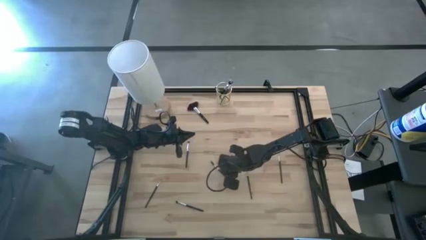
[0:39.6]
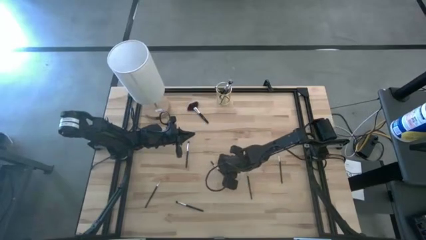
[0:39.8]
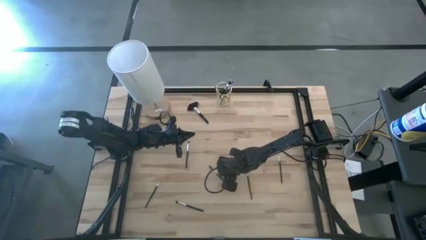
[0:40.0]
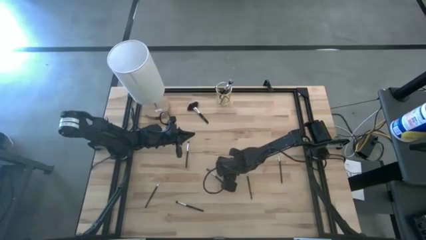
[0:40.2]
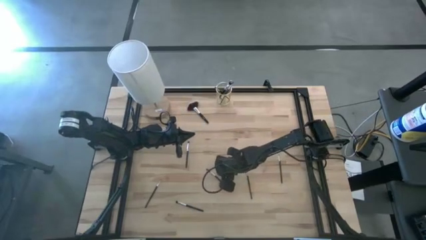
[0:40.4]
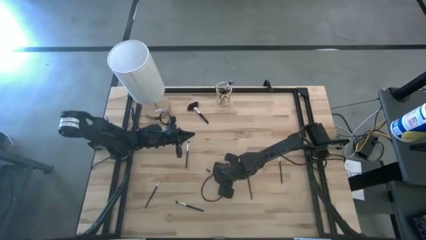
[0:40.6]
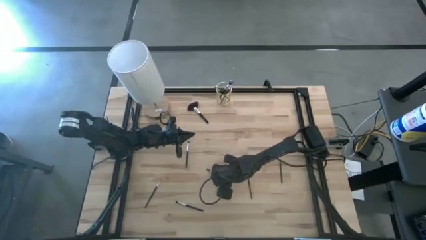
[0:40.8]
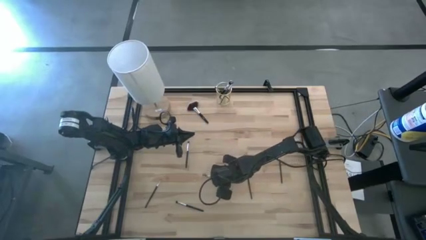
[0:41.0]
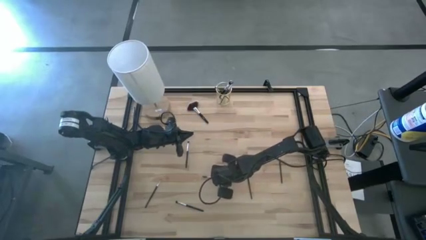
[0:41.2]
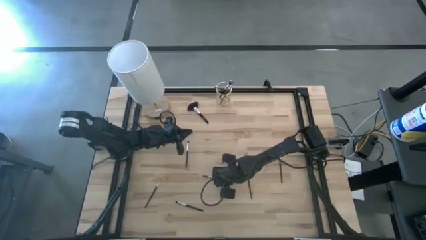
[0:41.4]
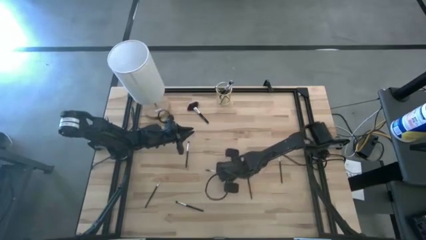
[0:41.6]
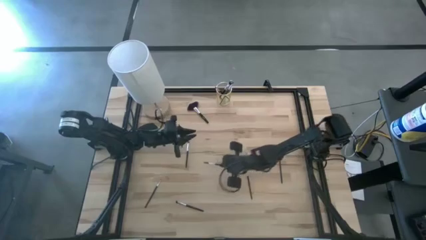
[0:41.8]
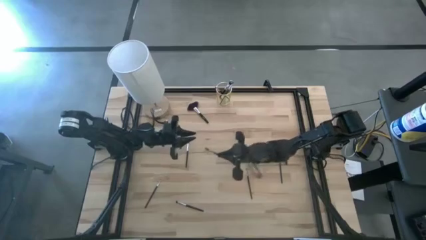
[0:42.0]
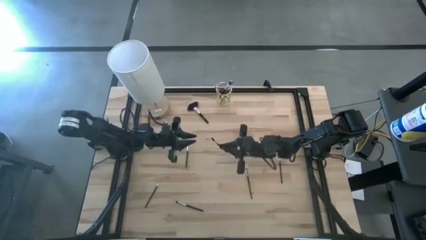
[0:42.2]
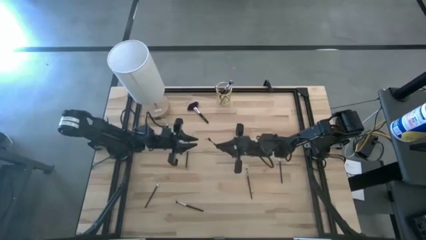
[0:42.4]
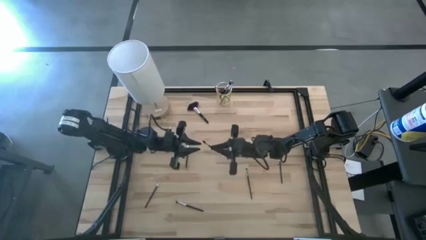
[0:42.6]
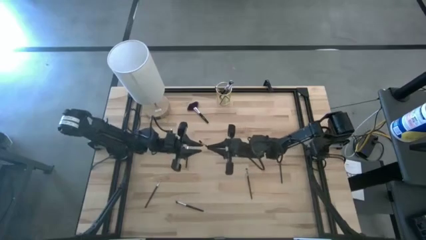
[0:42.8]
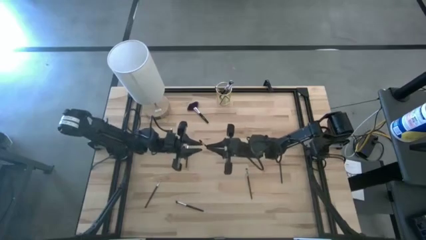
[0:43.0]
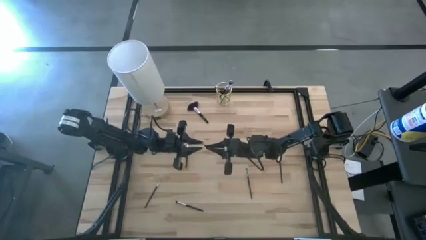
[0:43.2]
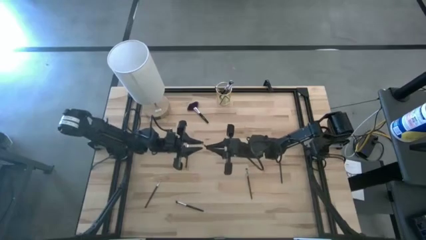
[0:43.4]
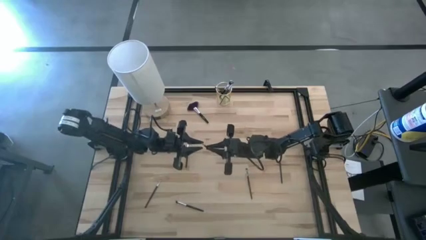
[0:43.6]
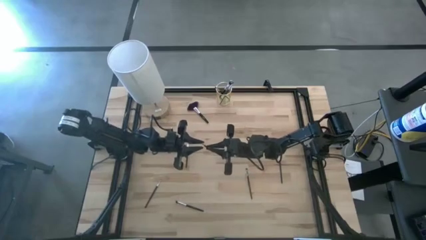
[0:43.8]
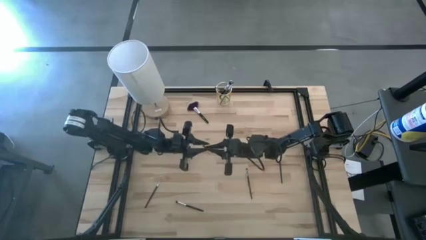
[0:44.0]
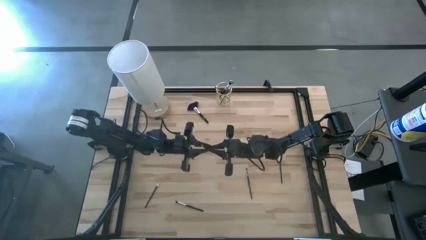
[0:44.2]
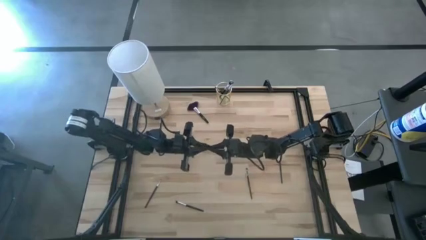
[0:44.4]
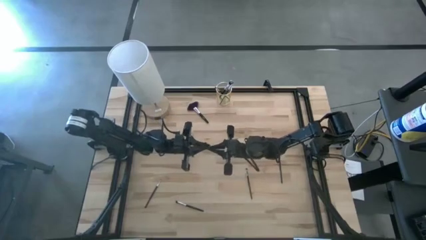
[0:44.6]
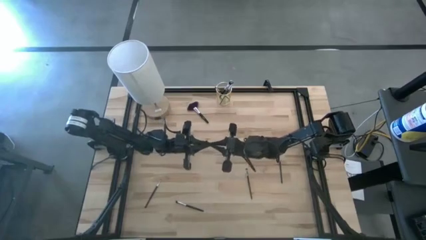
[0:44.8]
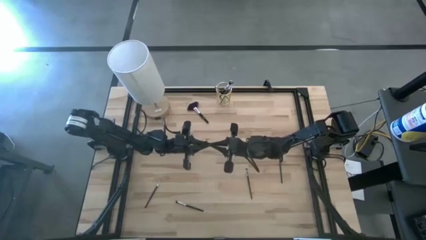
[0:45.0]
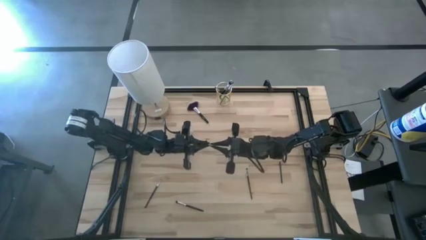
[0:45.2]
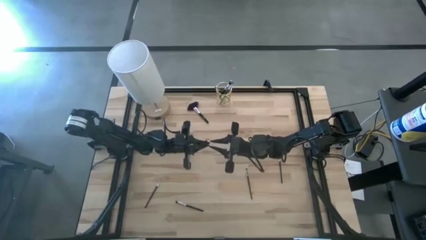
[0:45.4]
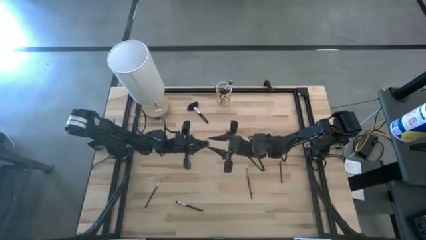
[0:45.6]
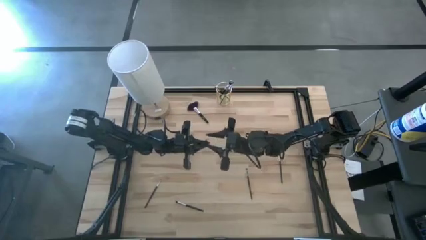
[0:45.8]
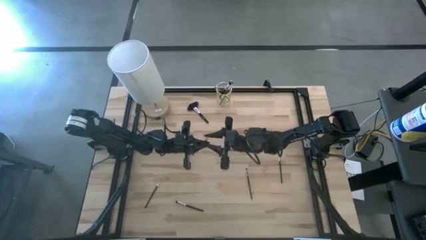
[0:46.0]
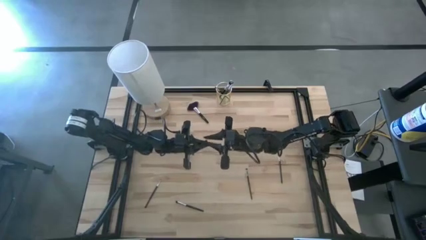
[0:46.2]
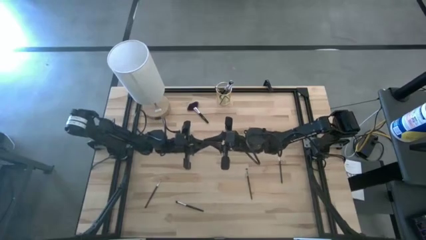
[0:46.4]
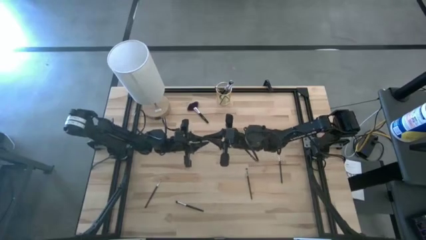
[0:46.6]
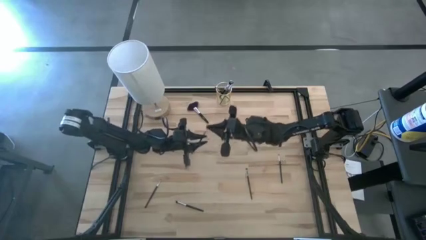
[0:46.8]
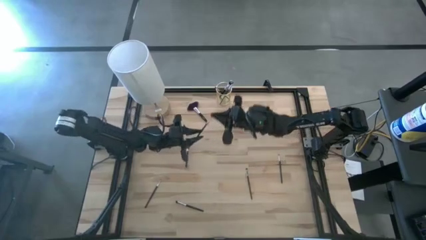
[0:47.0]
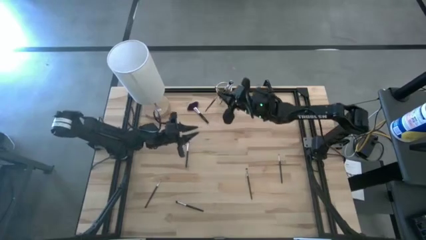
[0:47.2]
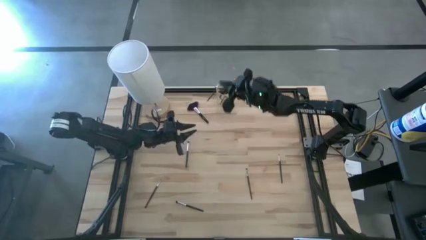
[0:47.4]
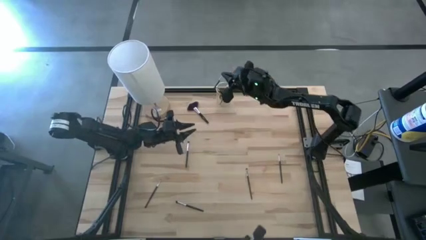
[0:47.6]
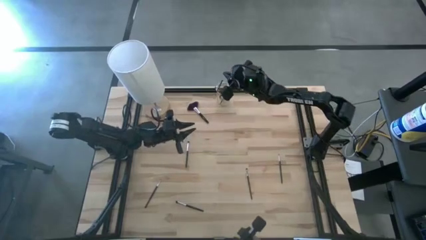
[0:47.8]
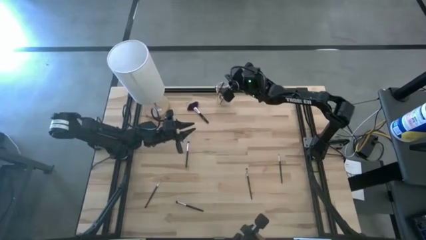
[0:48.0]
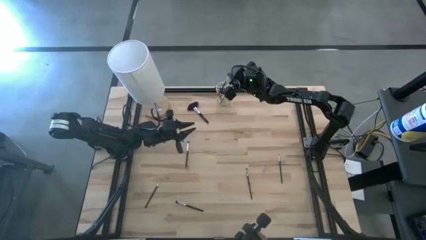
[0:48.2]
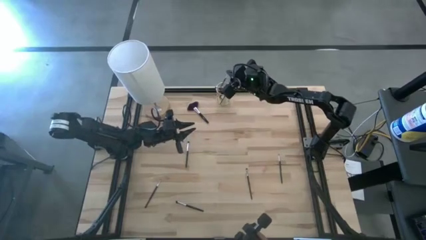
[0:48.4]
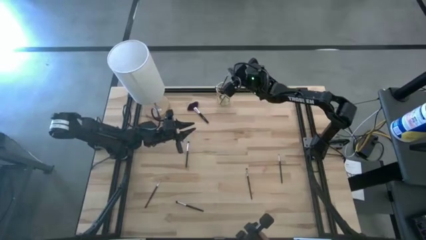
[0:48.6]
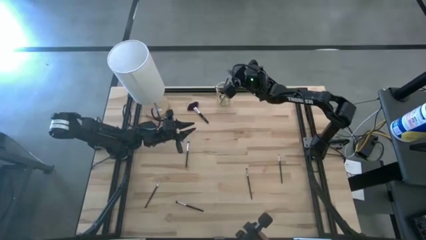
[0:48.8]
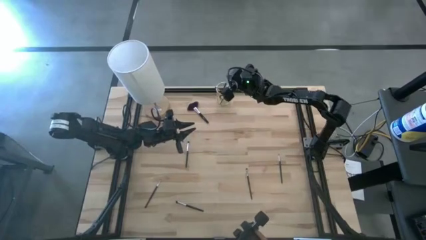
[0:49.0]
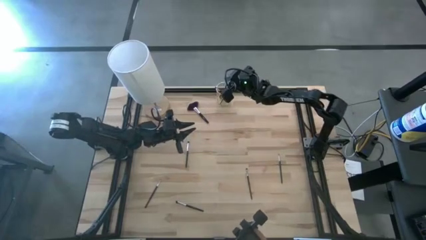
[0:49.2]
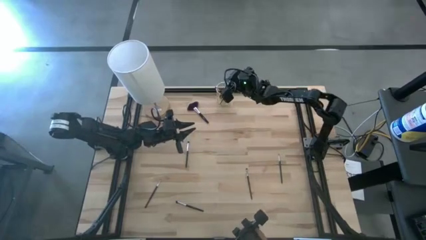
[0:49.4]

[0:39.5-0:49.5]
Task: Put items in baskets/containers
Put the lash brush into the gold container

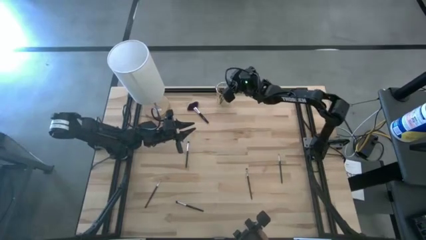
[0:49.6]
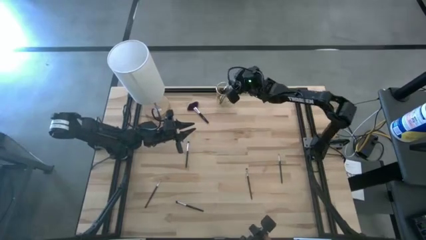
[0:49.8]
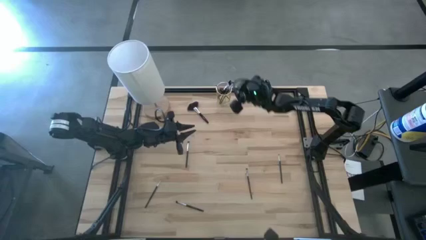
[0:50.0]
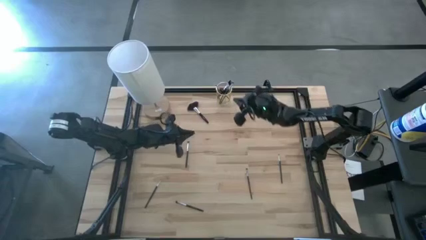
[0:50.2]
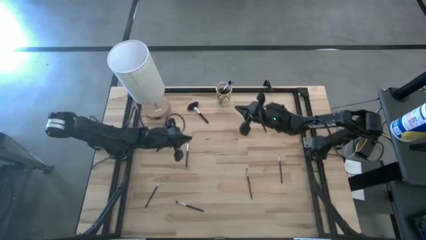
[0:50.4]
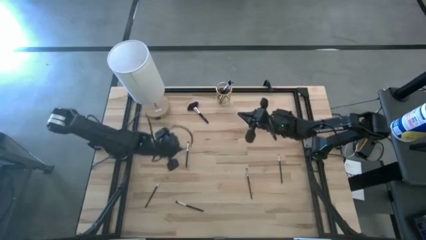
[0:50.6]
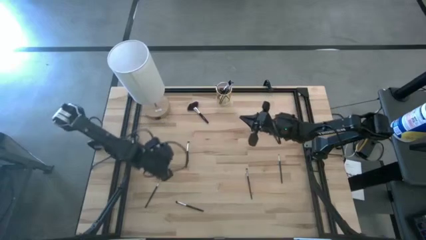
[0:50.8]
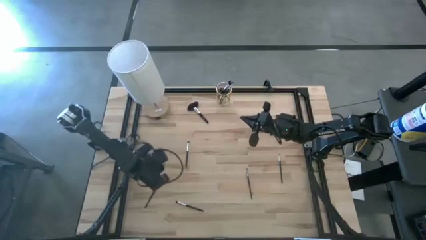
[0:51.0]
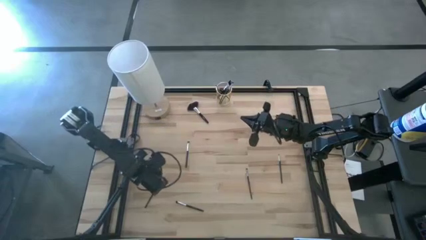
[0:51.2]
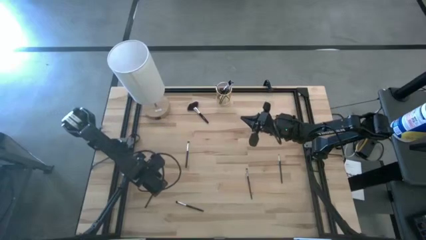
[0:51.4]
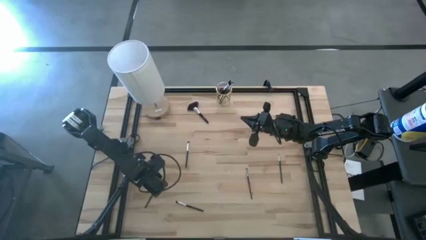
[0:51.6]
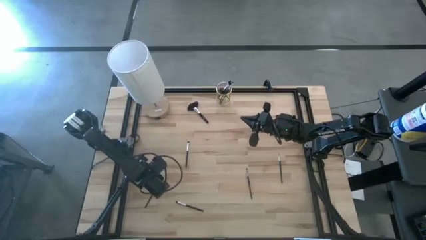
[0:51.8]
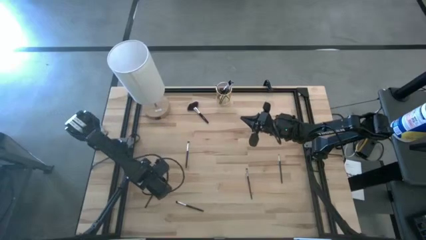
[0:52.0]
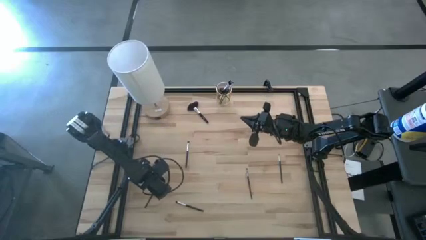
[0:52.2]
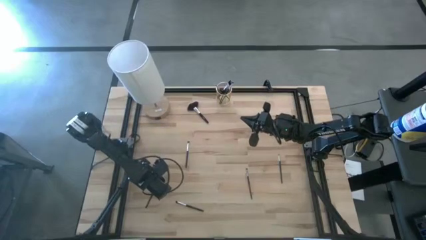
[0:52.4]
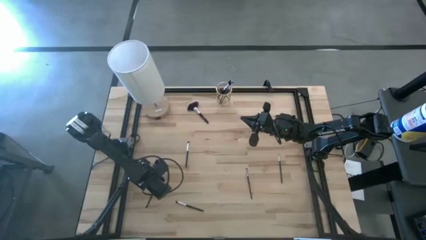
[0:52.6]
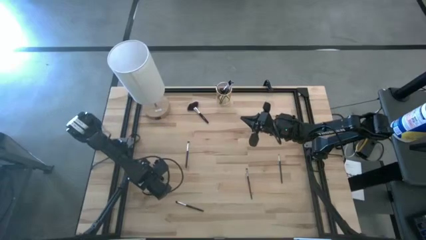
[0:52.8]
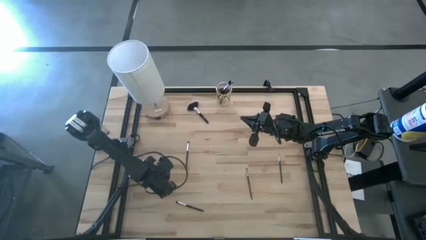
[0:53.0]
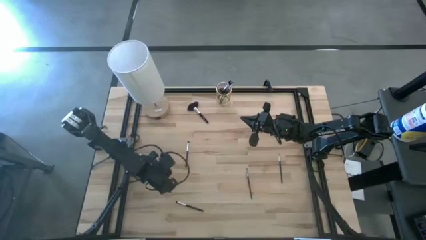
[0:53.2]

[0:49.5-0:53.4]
Put the liner brush into the gold container

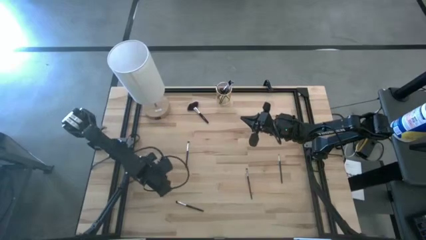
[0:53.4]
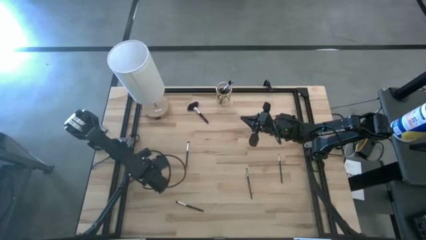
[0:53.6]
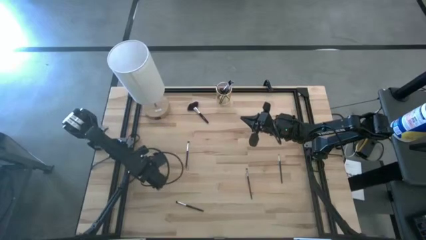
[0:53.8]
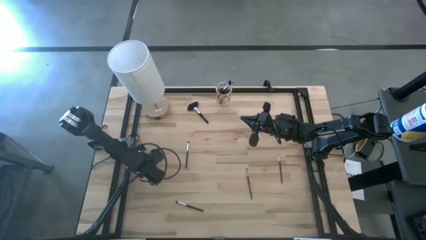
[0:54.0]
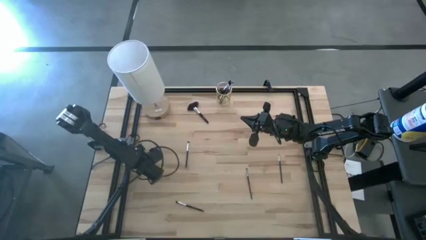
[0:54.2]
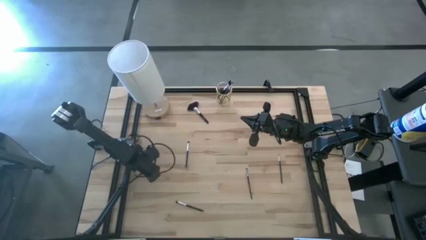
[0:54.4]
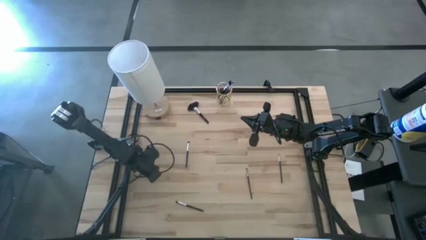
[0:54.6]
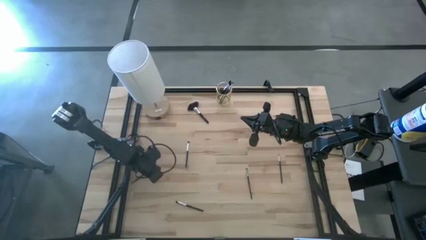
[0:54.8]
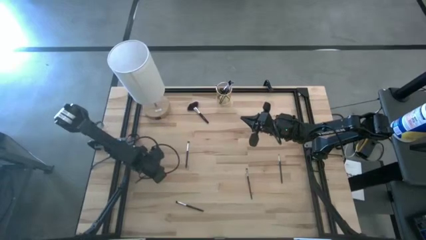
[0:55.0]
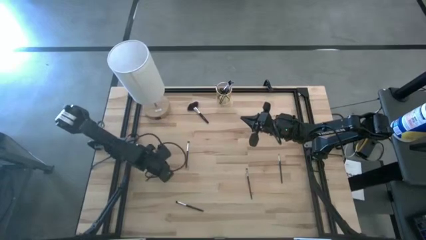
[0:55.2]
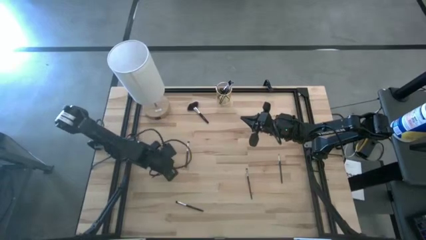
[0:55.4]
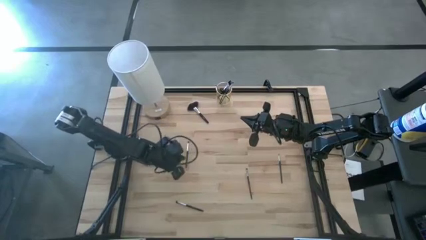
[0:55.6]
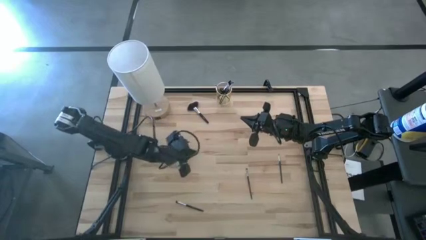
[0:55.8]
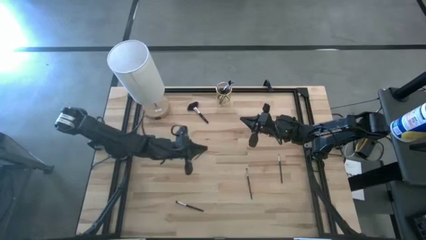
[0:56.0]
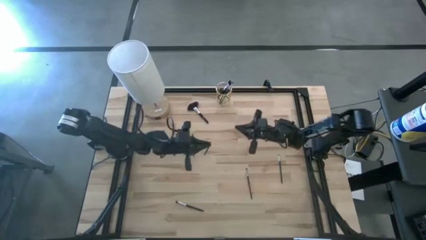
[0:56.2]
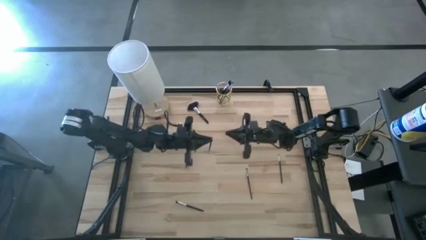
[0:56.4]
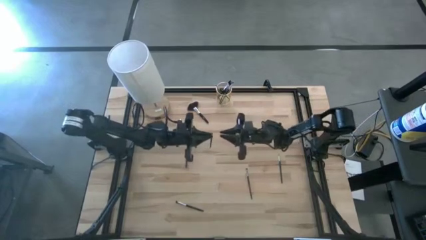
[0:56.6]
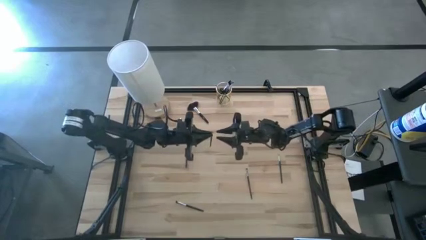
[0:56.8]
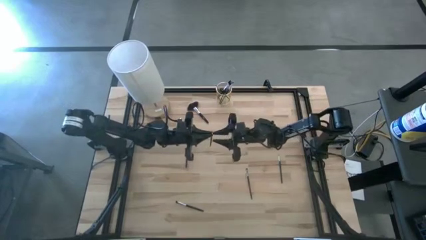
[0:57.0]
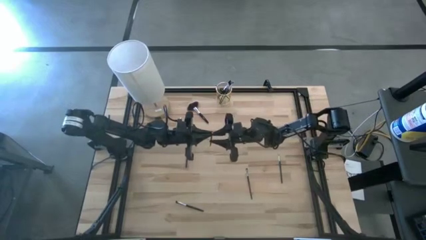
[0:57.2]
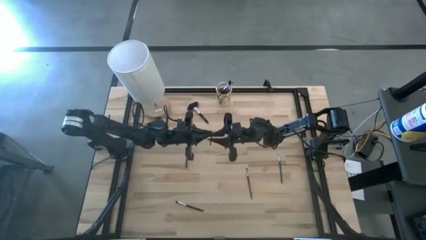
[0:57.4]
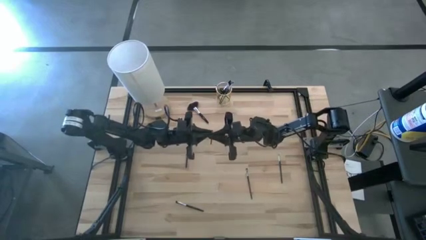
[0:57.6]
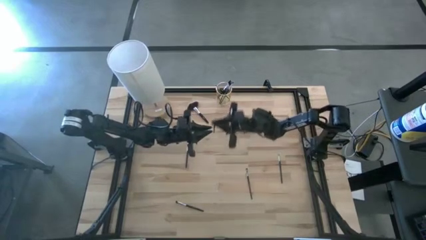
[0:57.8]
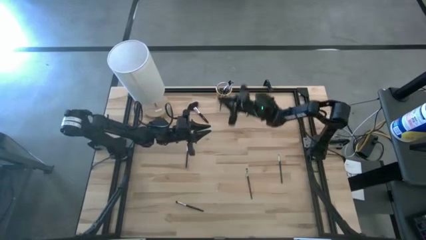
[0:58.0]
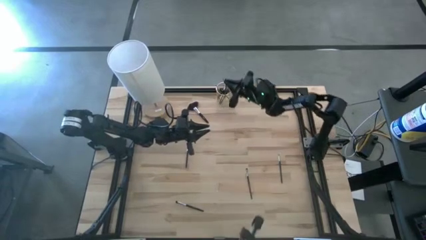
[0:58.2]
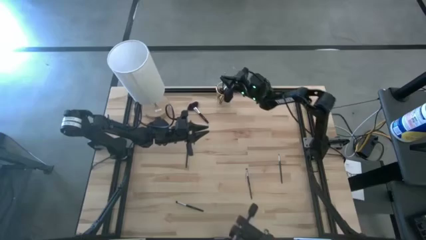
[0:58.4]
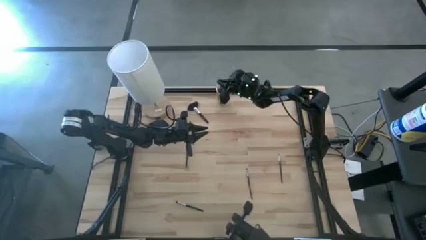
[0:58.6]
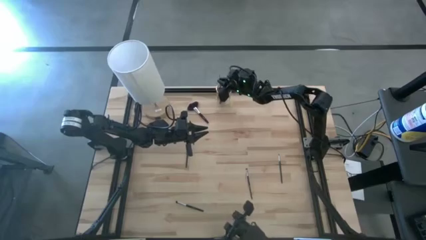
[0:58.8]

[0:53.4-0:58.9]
Put the liner brush into the gold container
